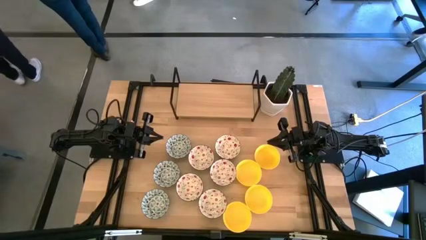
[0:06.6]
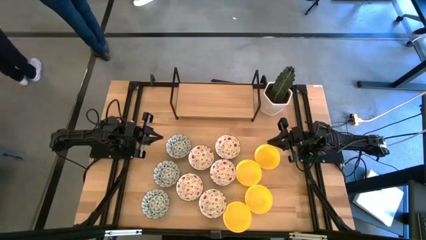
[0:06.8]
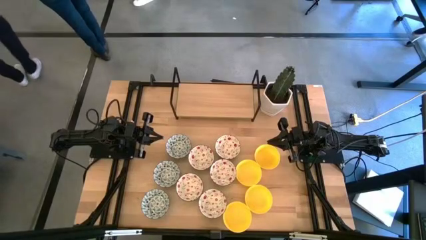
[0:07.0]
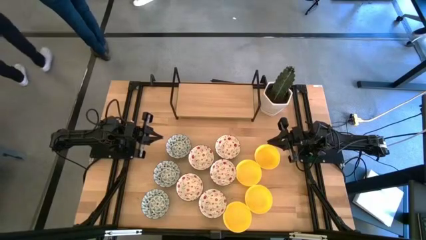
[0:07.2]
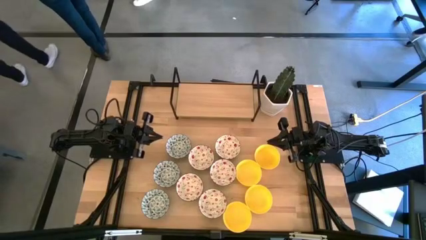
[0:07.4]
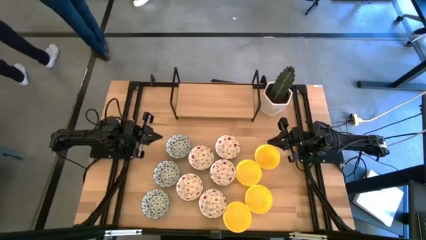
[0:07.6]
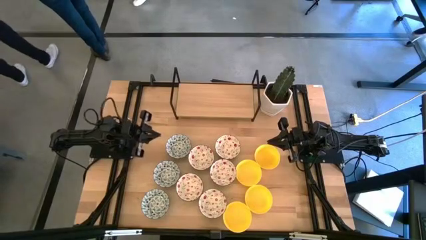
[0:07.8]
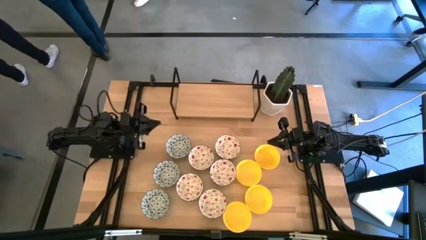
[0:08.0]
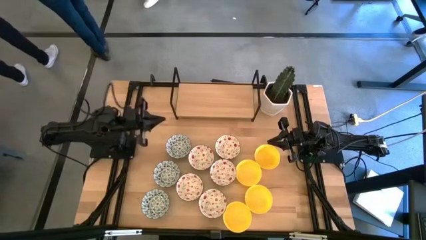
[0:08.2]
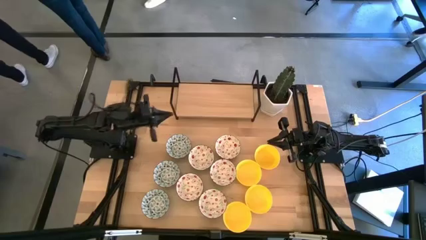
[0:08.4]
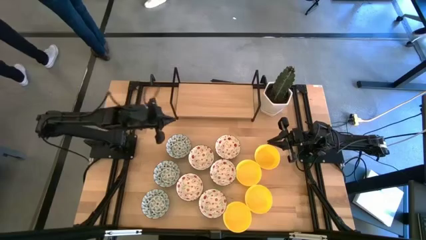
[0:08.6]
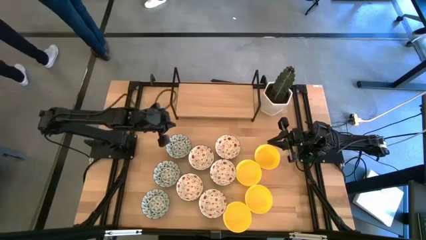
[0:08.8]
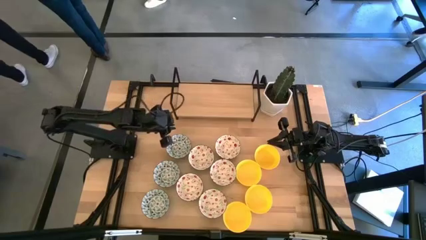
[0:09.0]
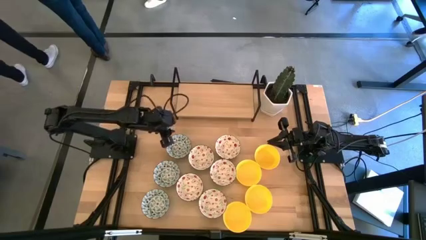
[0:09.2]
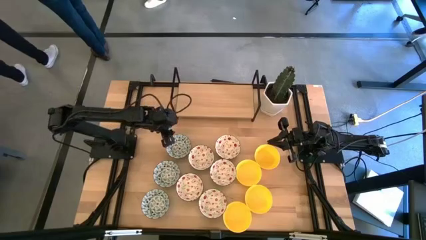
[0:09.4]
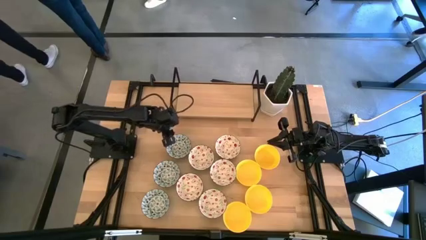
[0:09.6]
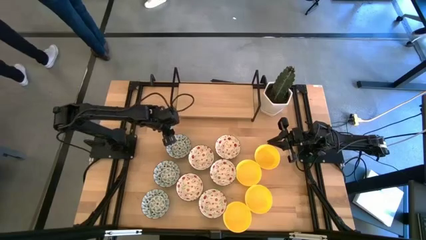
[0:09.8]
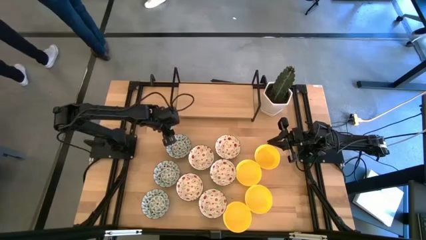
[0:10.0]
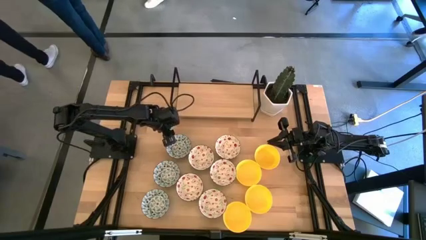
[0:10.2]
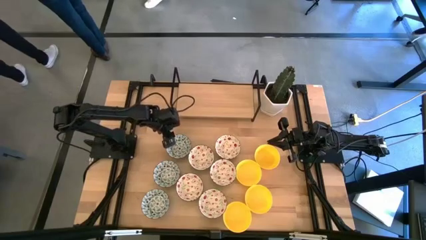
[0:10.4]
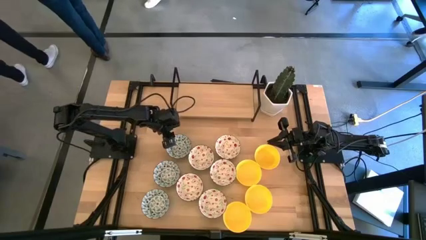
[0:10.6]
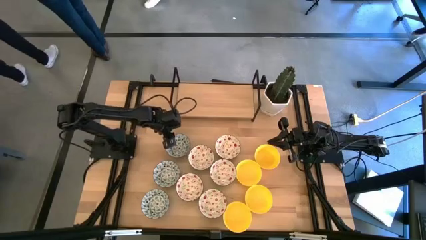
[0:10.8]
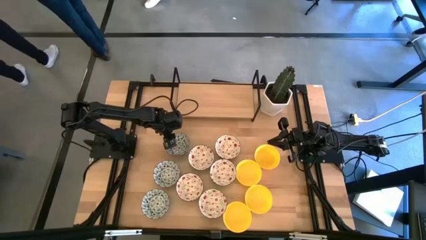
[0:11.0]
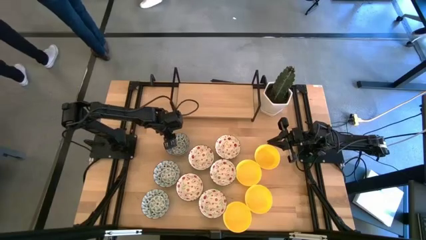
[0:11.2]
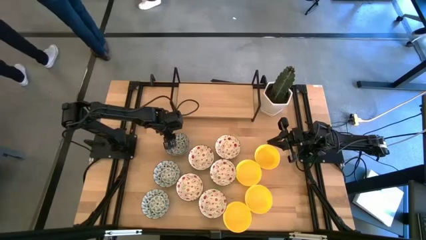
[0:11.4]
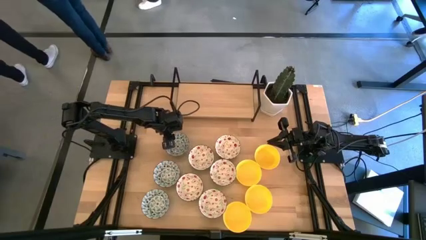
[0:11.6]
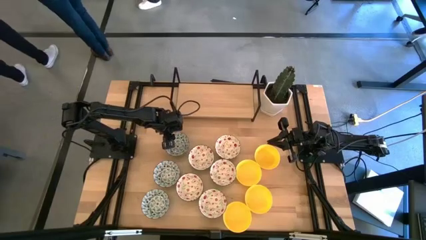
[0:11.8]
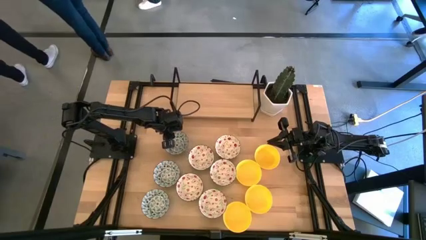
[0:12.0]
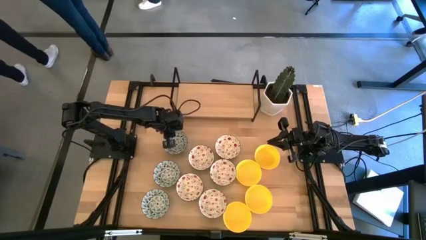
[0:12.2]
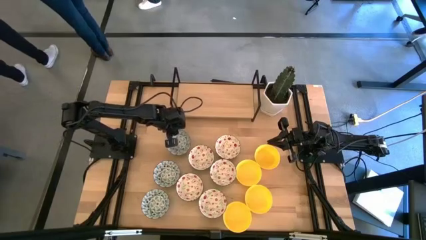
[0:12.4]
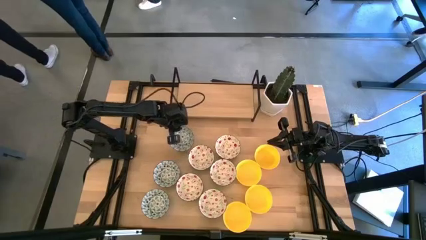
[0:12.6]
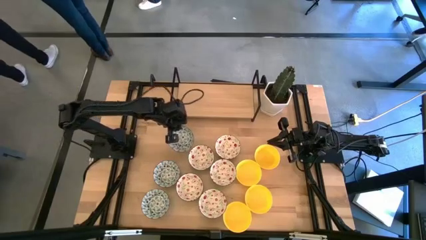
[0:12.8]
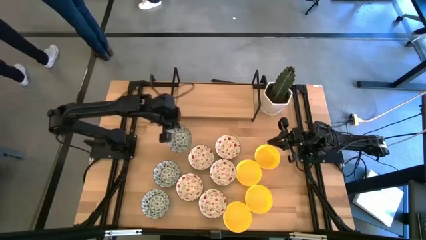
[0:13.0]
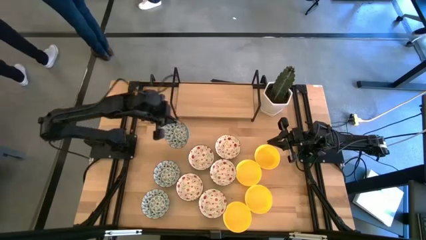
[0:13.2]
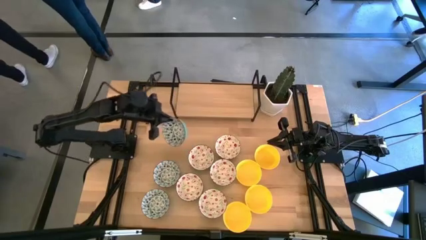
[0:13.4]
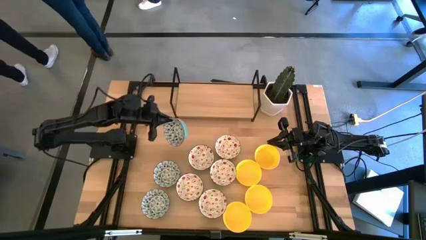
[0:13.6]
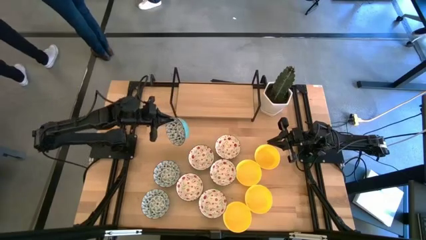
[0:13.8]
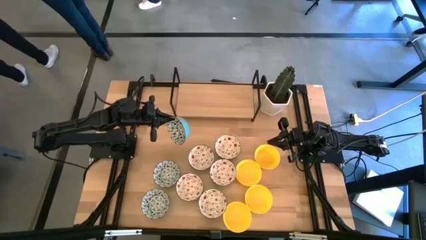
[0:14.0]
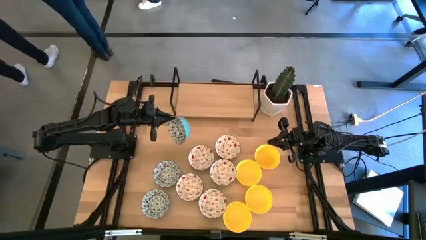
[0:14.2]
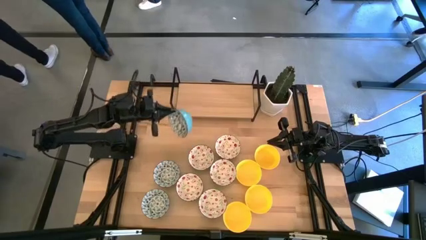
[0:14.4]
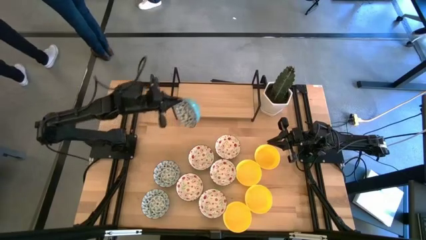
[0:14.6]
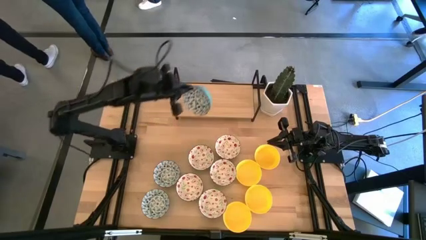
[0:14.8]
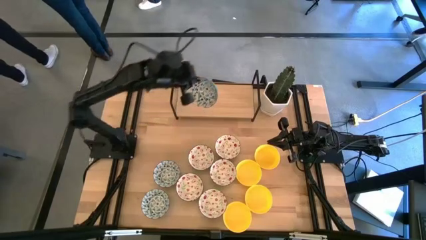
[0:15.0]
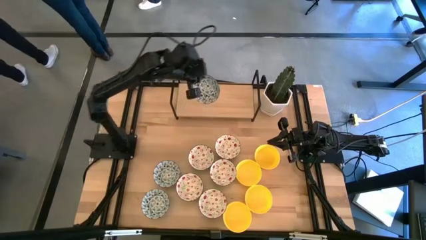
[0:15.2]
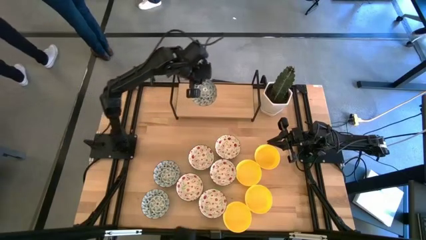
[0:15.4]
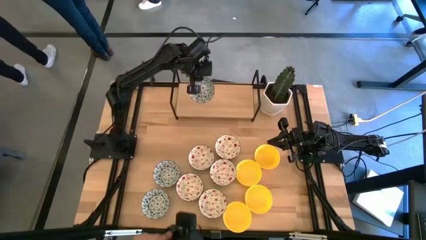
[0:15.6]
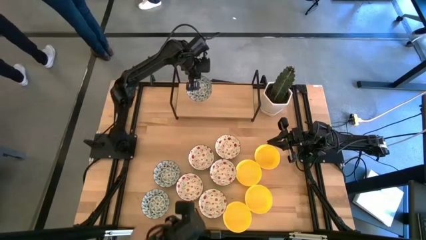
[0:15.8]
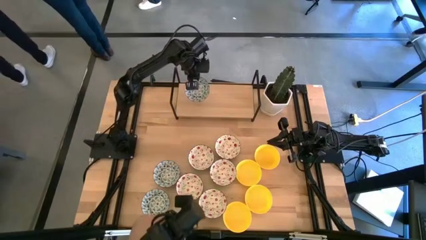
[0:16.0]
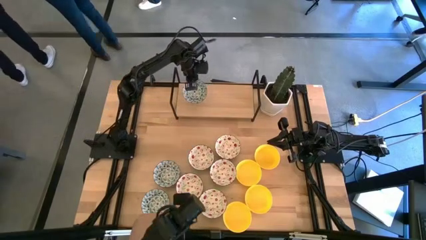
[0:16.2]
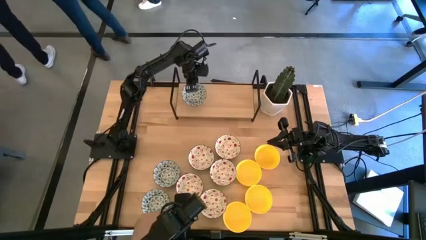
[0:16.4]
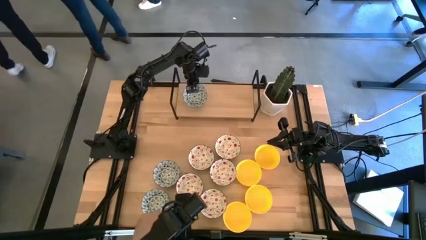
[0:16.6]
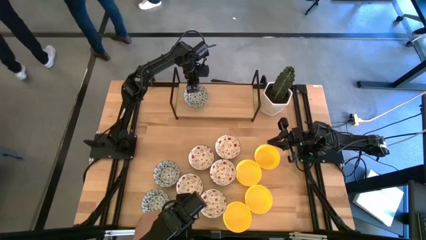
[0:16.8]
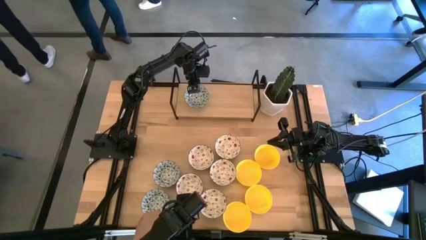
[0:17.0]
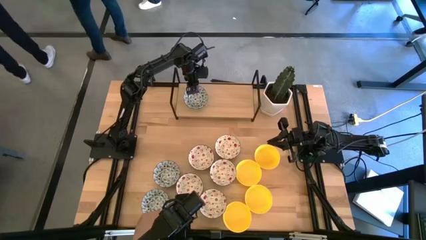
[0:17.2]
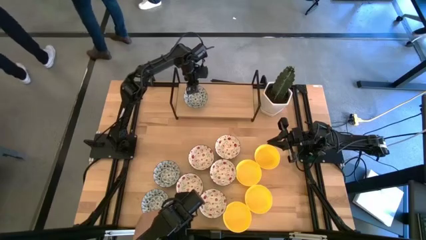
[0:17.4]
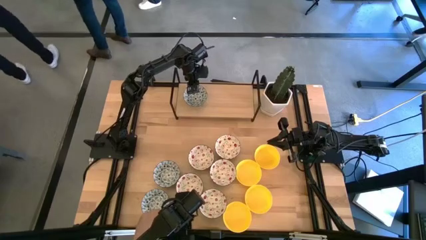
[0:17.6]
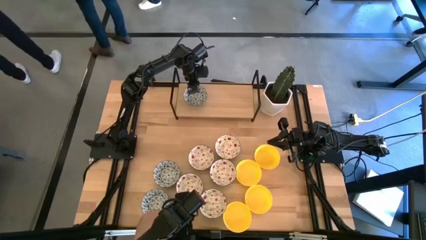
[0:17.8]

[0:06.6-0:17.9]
Task: Pick & Place Mini bowls
Put the blue patterned bowl on the shelf

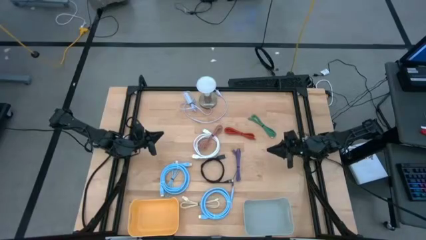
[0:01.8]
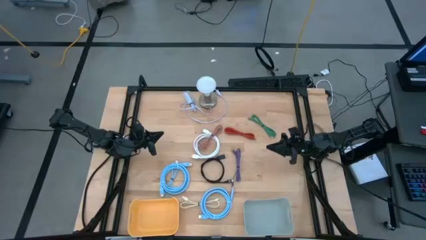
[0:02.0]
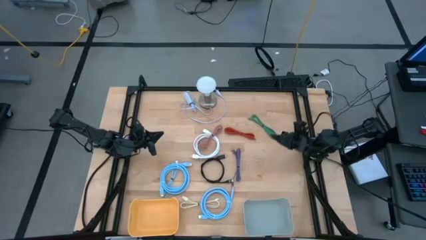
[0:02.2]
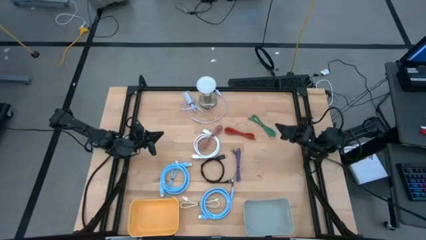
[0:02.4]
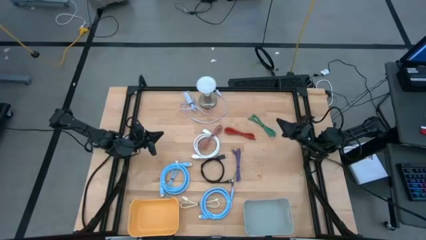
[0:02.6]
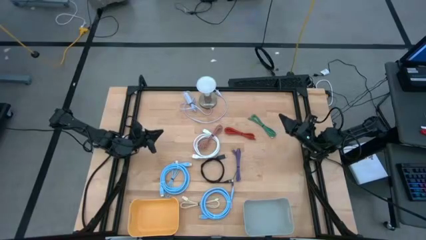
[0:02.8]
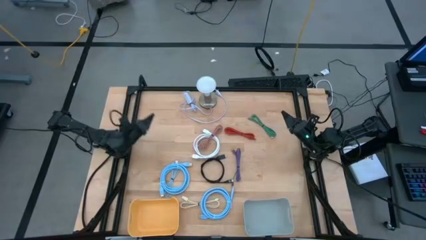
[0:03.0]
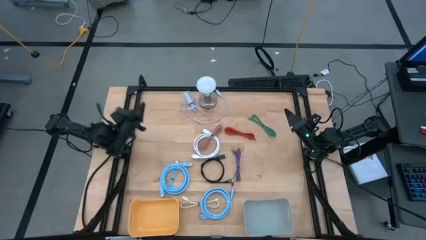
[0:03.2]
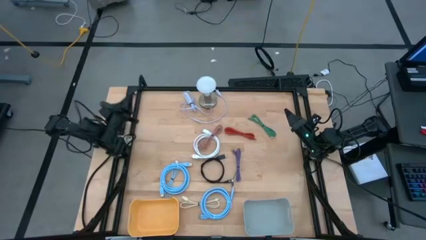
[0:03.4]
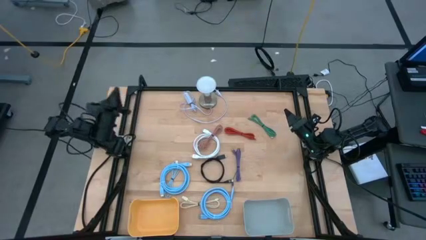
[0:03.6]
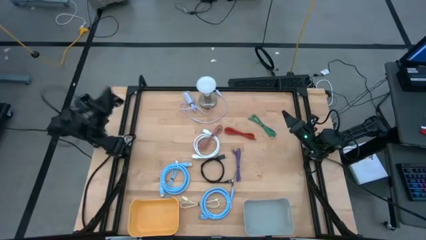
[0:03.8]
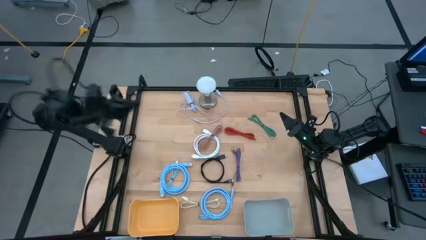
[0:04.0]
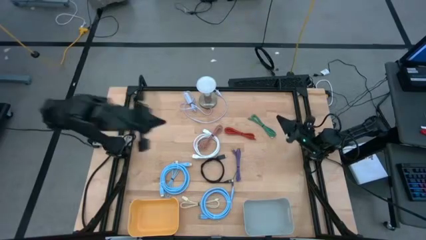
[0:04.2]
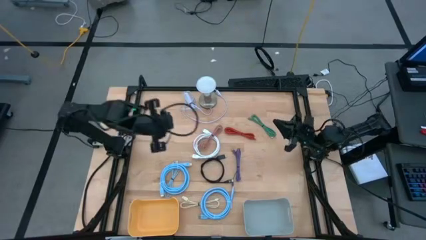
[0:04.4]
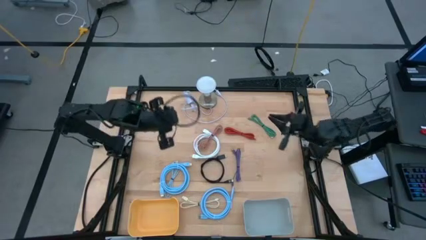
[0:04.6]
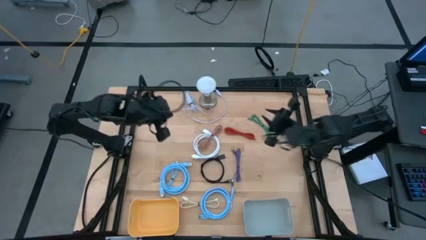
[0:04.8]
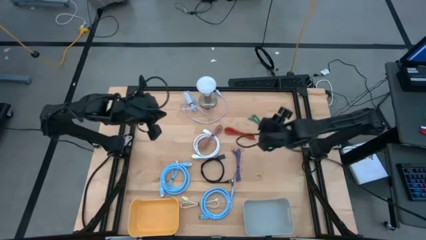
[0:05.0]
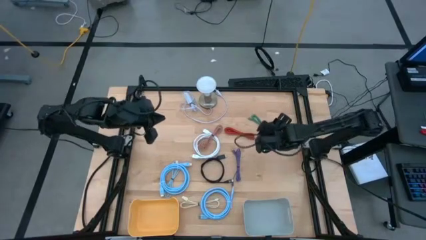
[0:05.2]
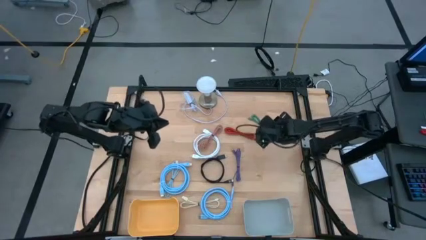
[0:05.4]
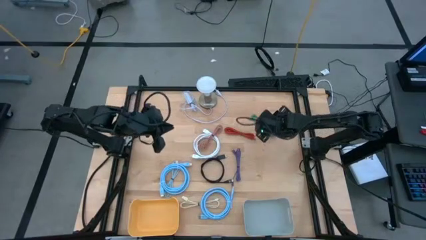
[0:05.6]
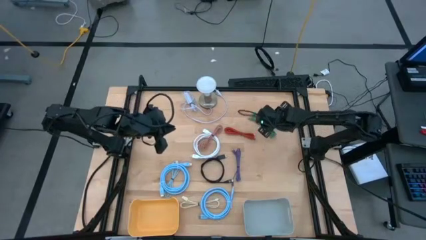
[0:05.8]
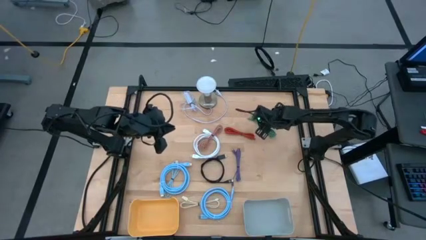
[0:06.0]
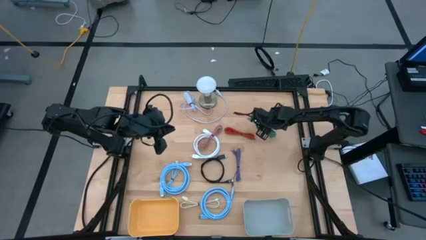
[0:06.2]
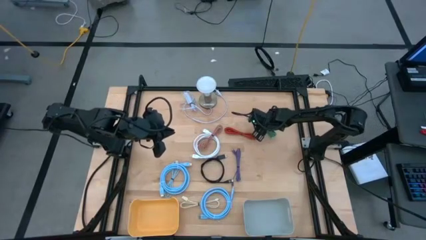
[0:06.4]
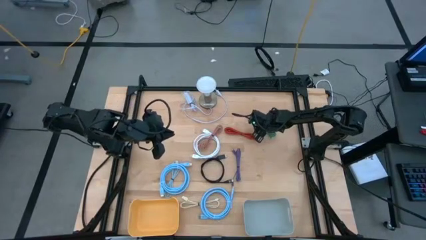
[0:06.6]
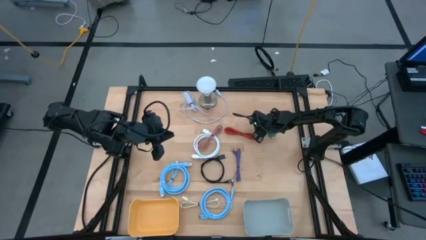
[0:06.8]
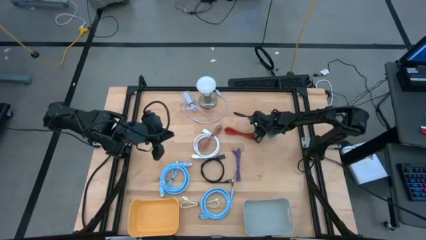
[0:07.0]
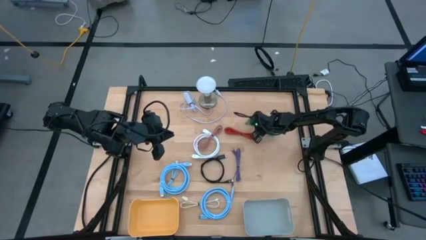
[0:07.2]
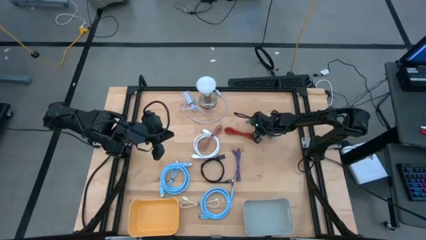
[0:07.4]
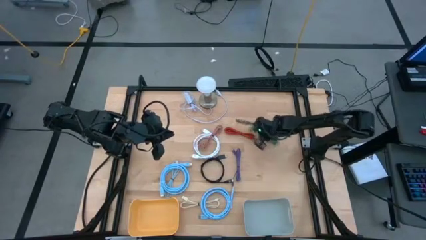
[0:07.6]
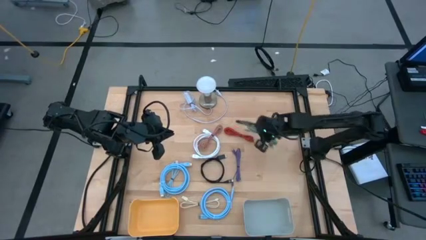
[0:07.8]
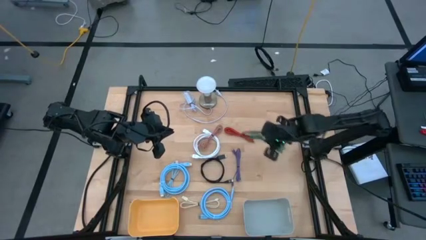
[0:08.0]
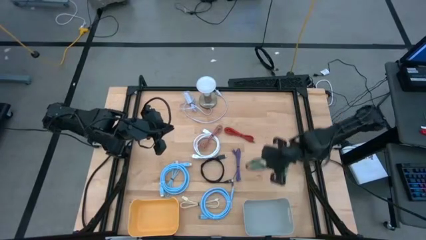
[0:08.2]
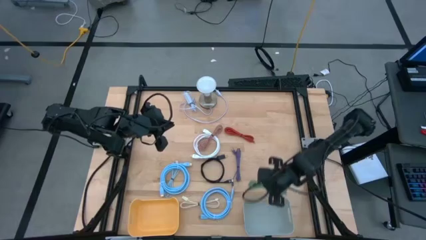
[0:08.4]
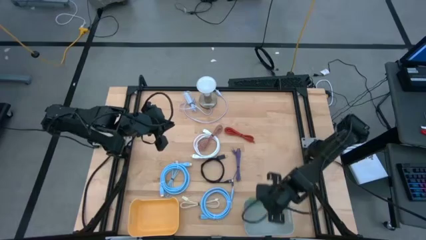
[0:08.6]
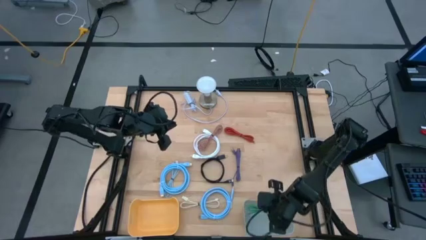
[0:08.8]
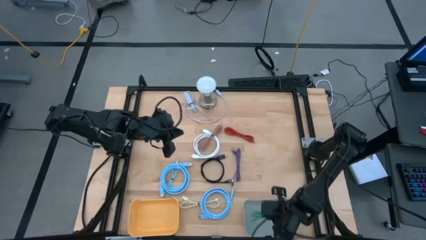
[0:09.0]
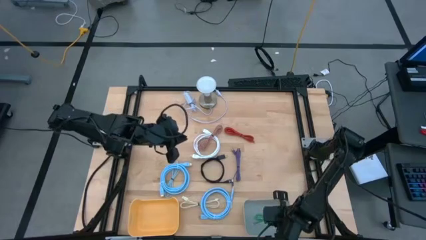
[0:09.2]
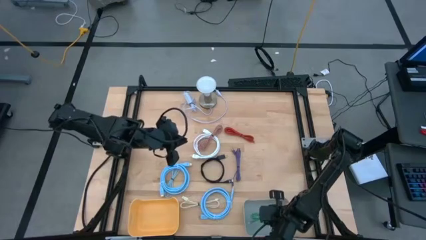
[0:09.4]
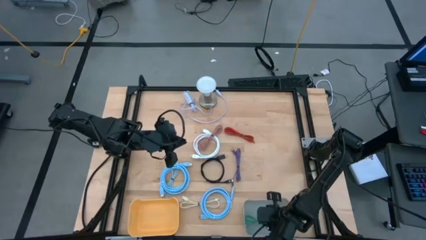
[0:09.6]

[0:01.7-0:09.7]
Task: Pick & Place USB Port
Put the green charger cable into the gray bin
